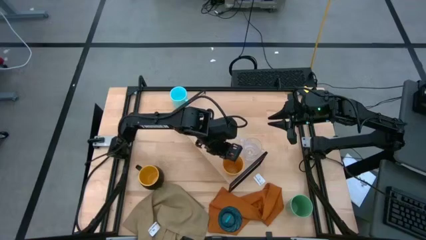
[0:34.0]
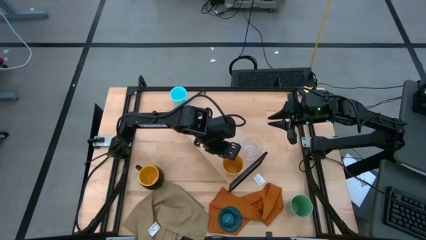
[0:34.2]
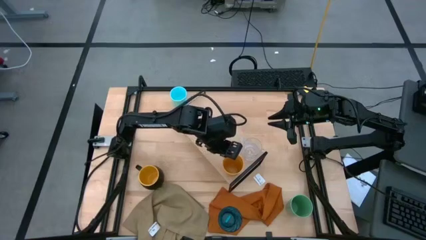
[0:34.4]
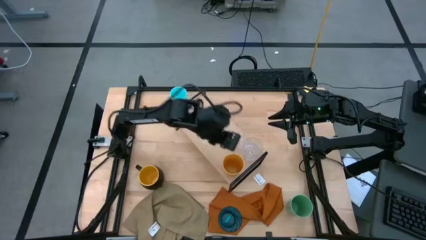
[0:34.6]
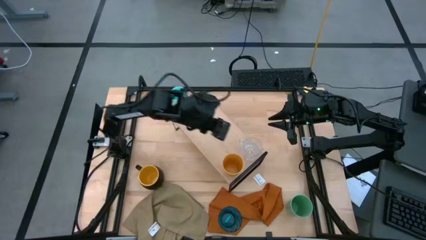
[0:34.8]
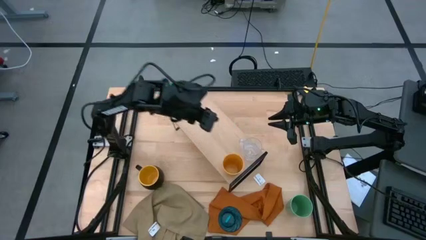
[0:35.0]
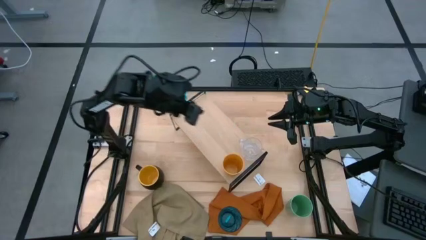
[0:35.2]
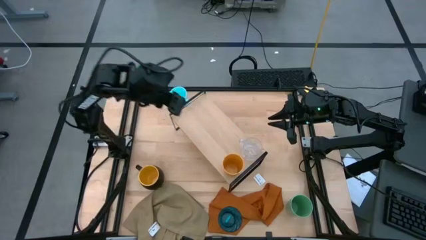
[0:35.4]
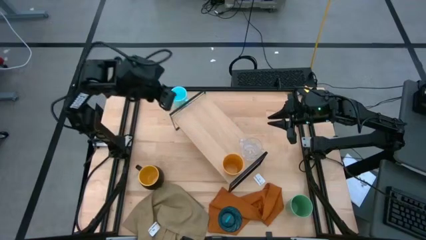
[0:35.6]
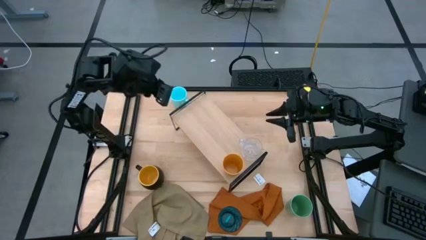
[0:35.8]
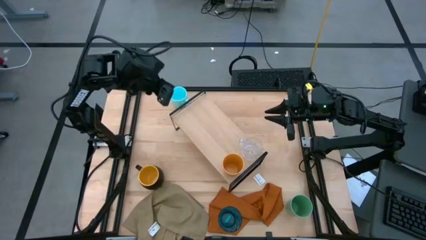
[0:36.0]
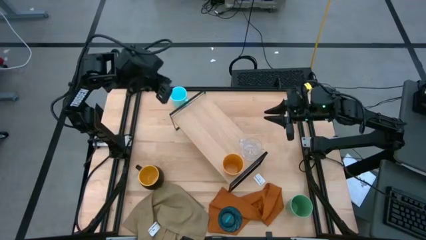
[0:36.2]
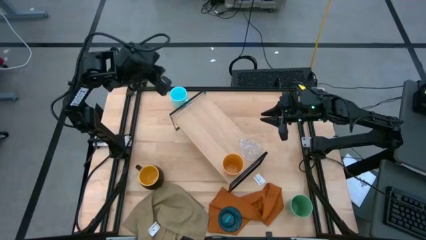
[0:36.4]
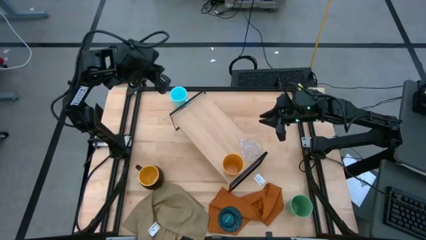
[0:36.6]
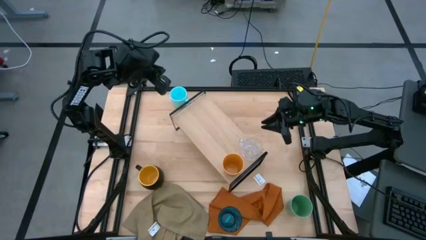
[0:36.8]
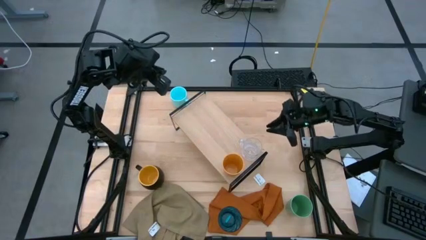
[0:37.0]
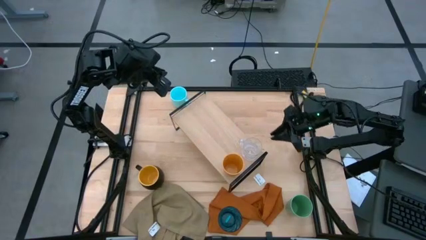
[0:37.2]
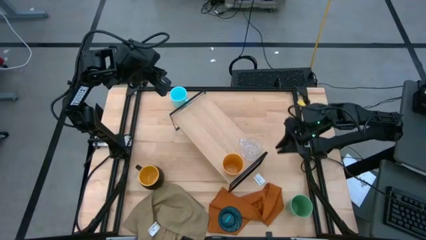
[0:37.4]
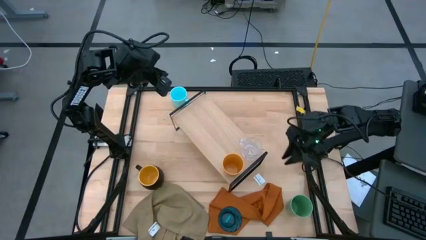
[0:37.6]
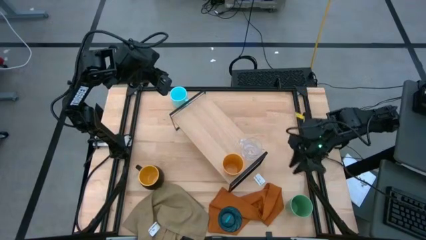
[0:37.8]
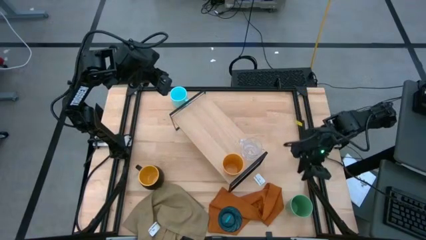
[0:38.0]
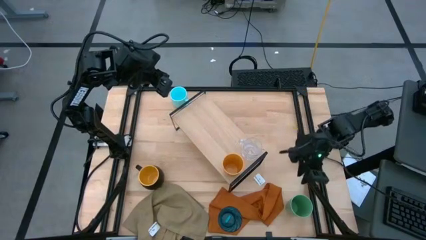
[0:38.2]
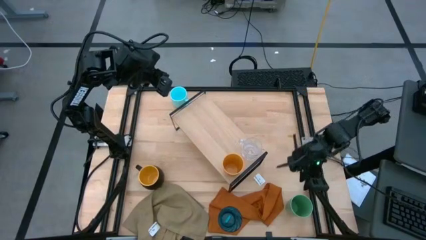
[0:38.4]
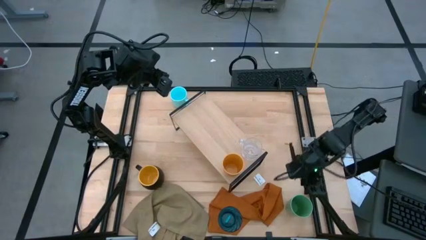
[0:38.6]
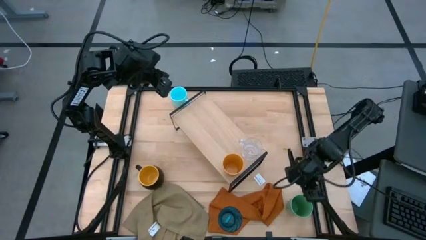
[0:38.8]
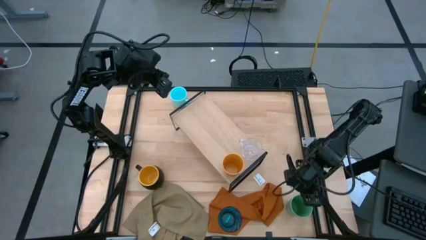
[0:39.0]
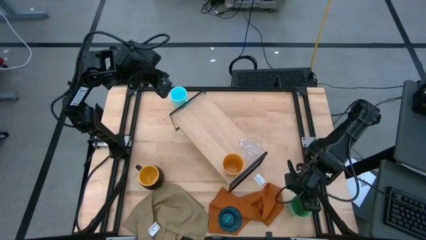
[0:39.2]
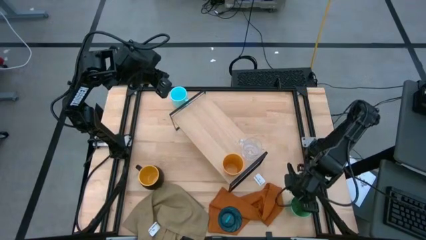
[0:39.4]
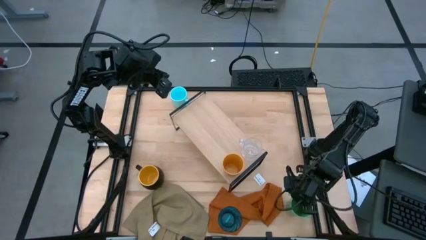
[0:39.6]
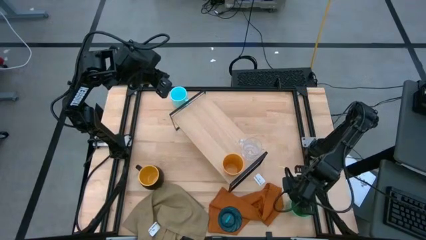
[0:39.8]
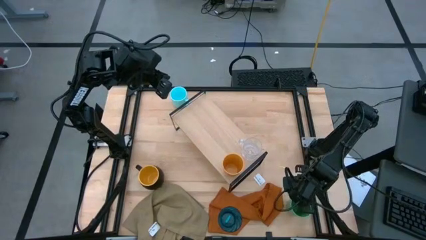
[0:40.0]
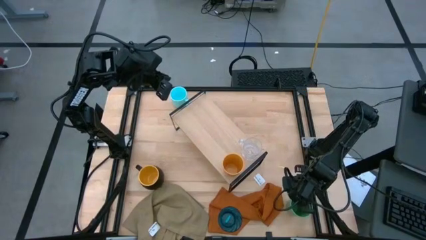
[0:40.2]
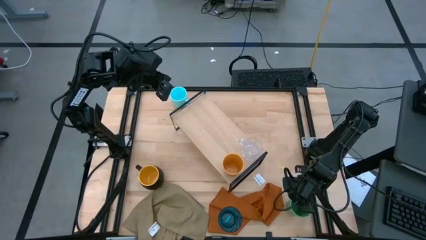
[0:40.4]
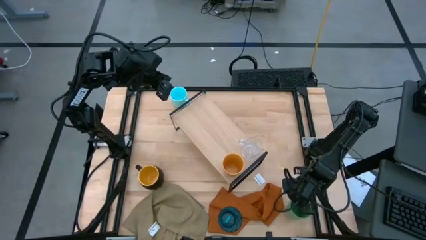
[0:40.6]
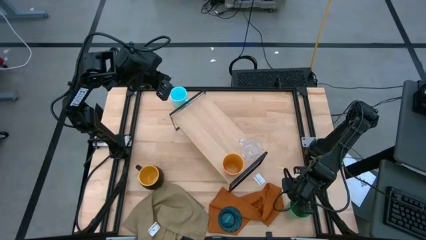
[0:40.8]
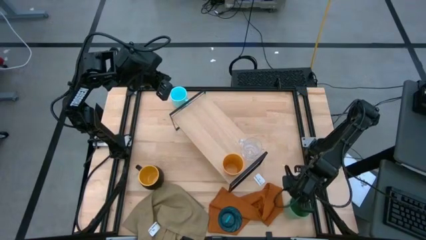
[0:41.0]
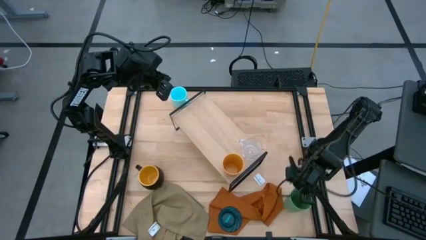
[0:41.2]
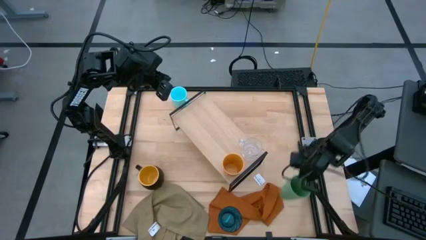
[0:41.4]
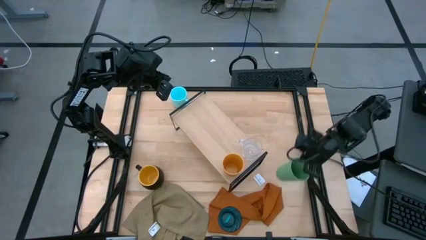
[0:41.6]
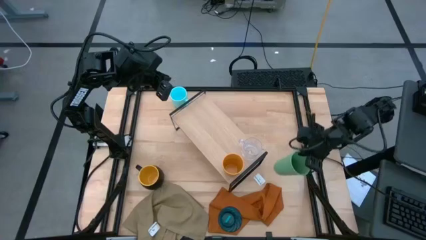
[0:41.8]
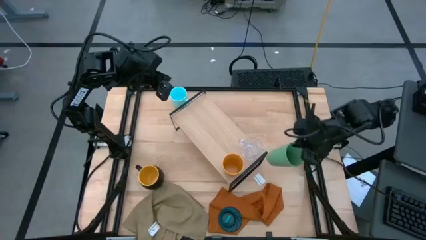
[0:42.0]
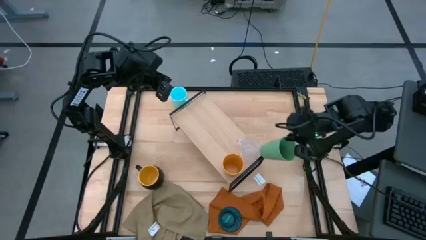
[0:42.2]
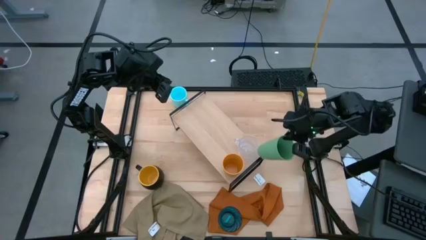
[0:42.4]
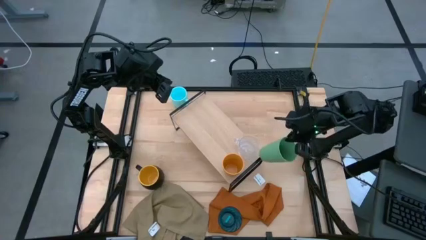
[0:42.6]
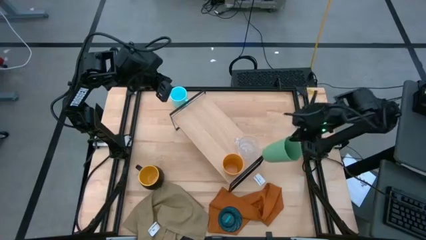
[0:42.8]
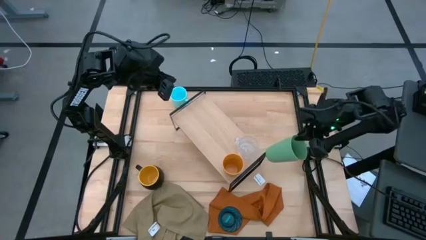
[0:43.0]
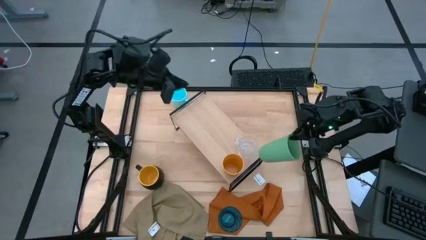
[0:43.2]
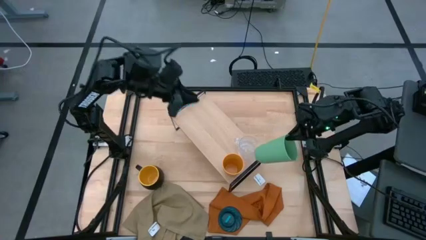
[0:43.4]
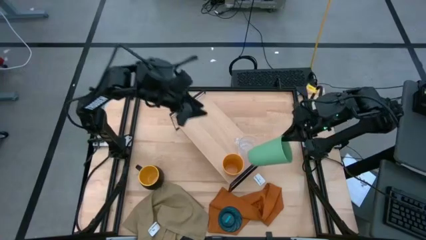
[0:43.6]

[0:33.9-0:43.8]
Task: Stack small to large cups/mugs on shelf
Put the green cup on the shelf

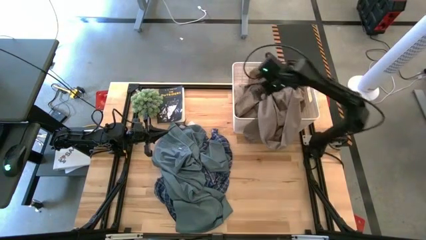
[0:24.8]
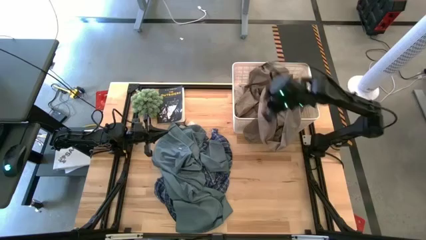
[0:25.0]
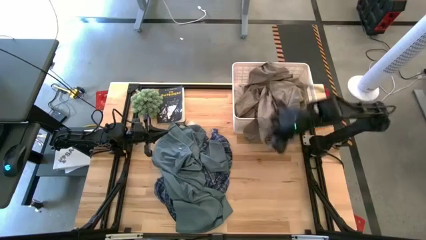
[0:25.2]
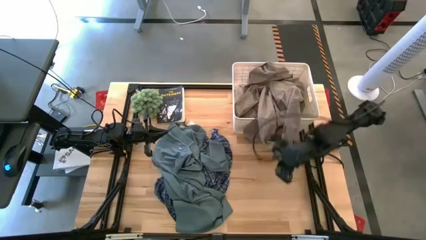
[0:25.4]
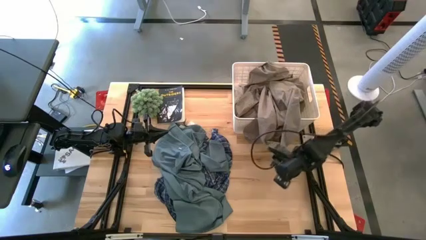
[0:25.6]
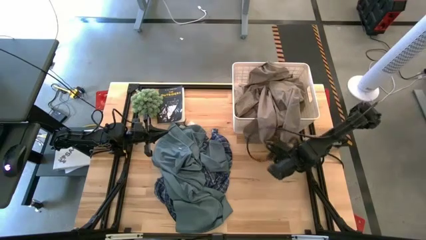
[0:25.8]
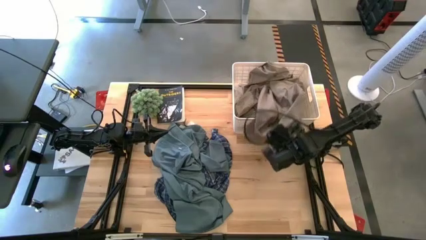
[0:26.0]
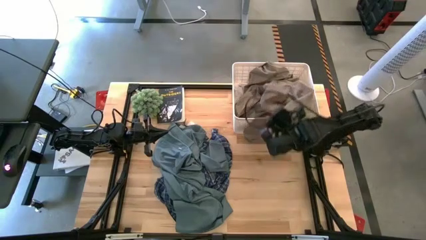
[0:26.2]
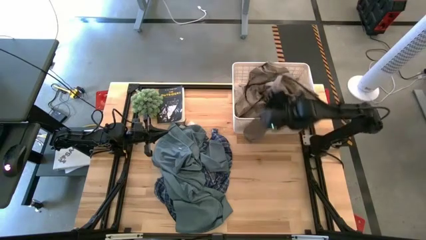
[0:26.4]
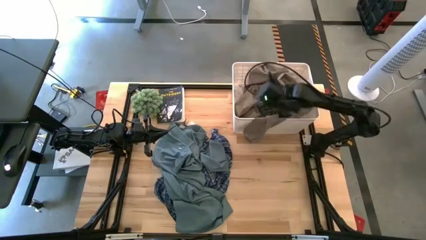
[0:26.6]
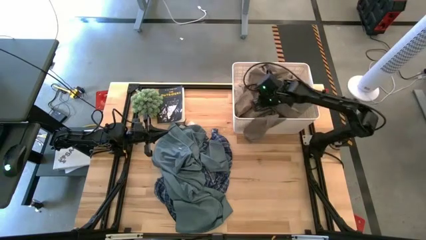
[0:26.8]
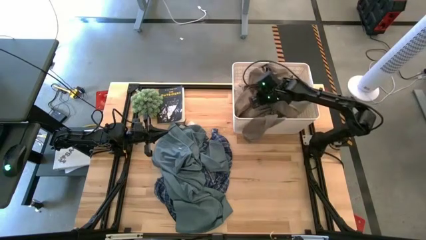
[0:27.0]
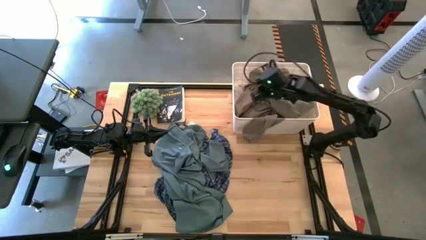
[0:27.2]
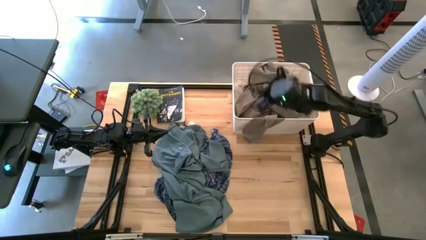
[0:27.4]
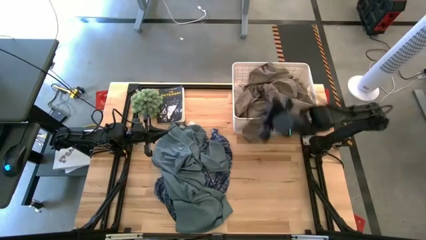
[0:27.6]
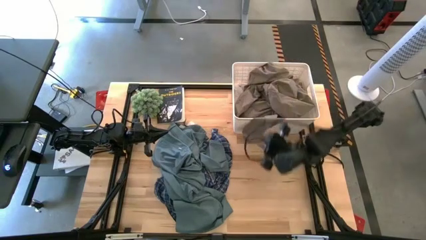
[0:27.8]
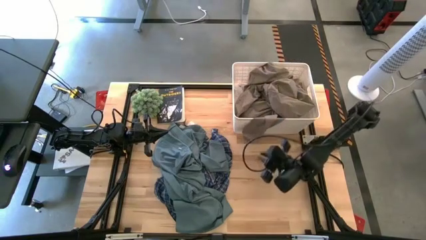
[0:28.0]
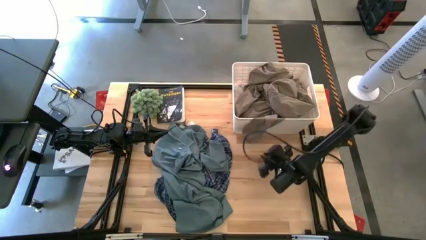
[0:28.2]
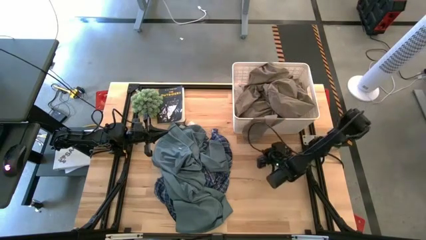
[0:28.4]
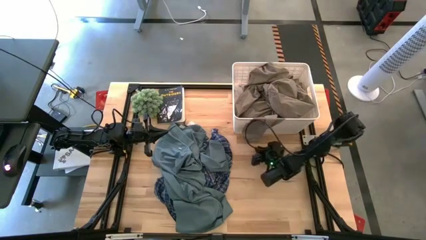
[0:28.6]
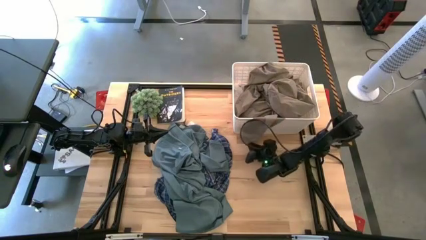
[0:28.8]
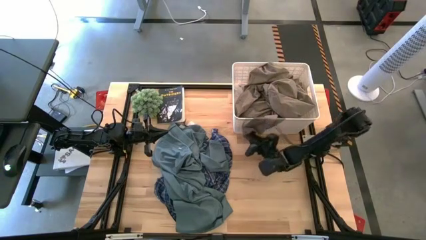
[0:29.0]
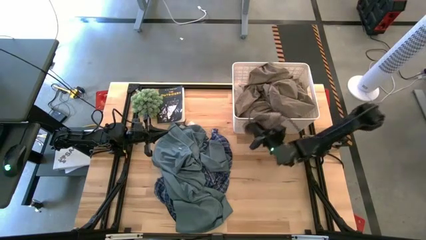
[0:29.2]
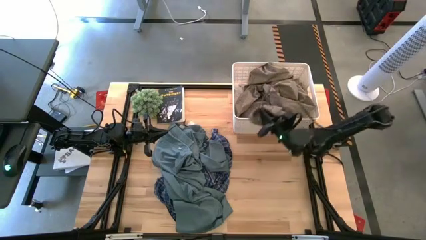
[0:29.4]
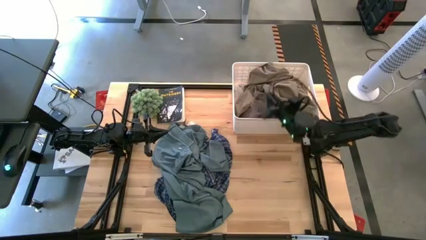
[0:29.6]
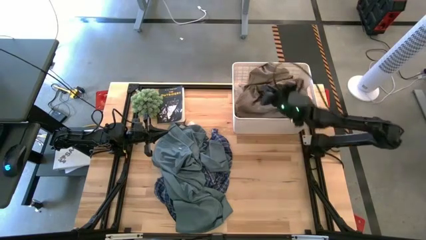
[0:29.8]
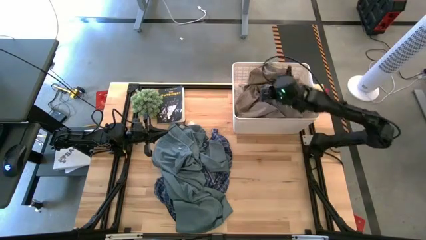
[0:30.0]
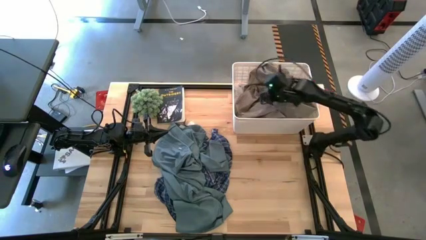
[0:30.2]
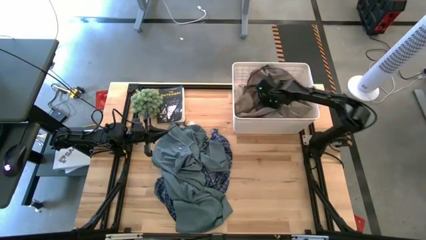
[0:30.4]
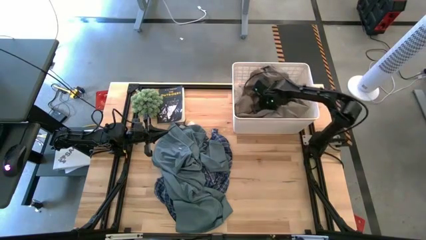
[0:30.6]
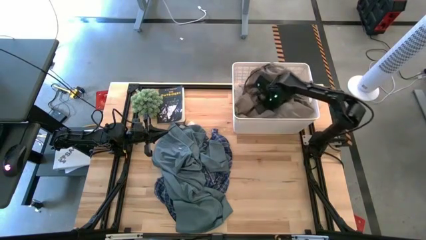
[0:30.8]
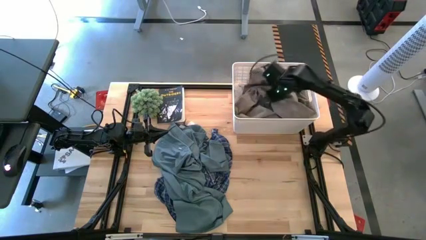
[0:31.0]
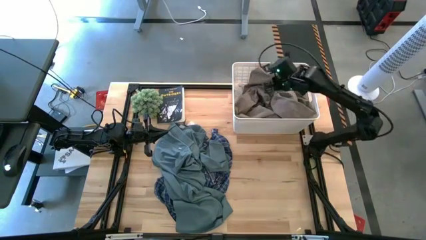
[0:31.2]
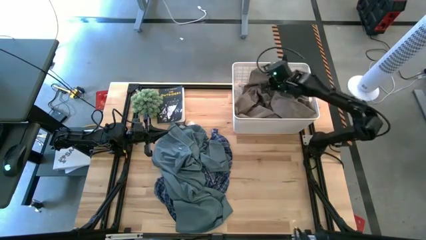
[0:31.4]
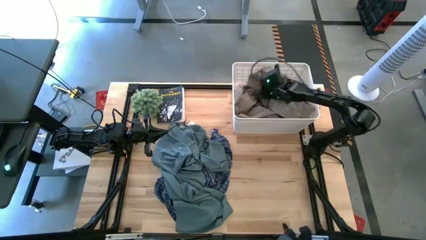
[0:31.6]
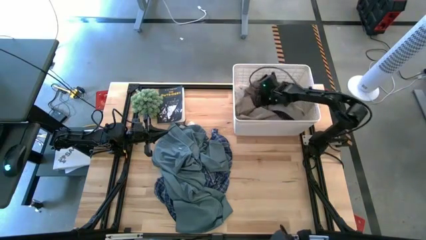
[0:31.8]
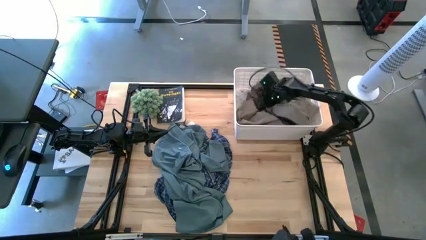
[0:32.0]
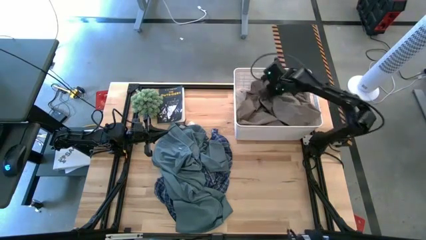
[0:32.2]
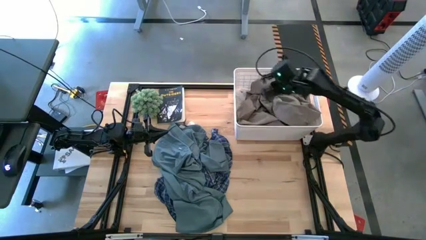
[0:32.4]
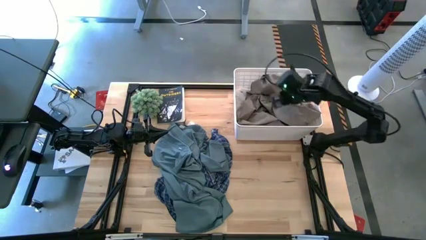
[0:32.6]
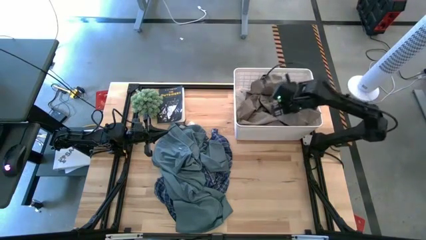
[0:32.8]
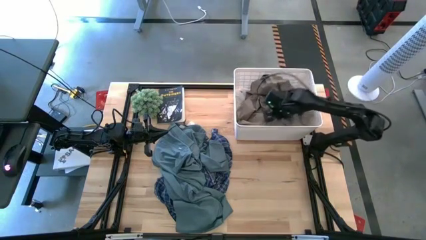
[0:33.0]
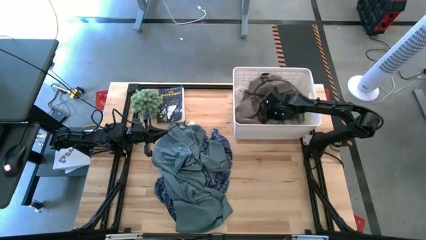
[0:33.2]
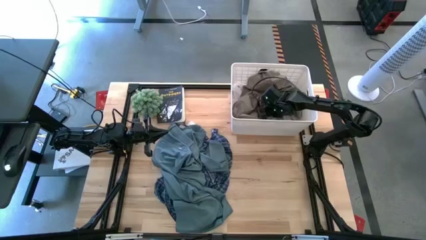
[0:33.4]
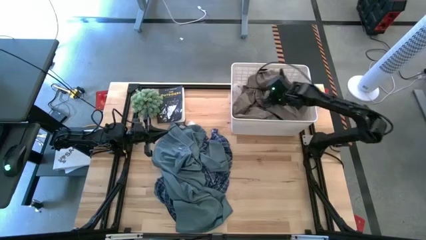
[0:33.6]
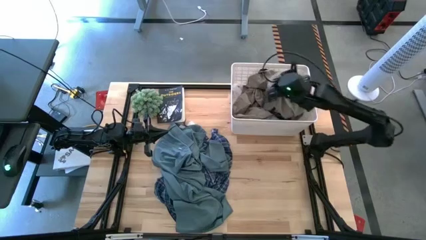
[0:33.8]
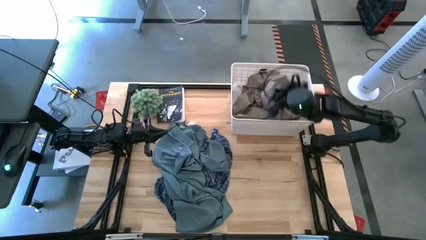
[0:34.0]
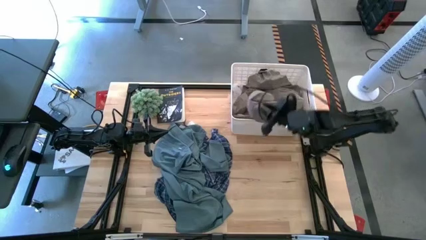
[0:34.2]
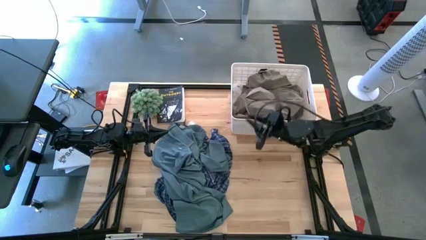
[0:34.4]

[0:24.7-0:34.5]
Task: Sort clothes
Put the brown and blue jacket into the white laundry organizer
